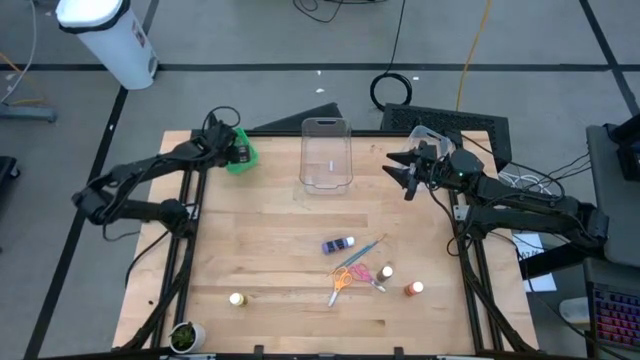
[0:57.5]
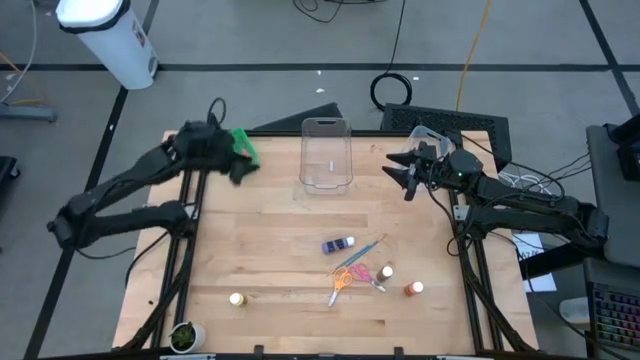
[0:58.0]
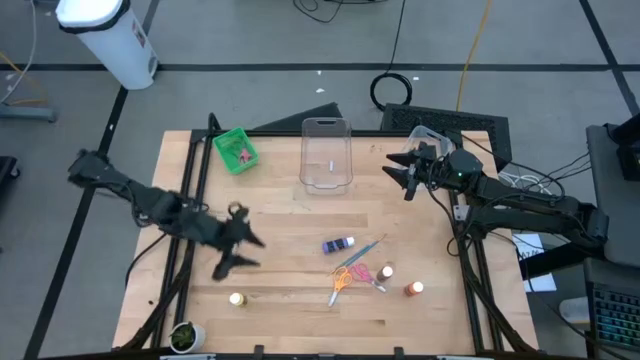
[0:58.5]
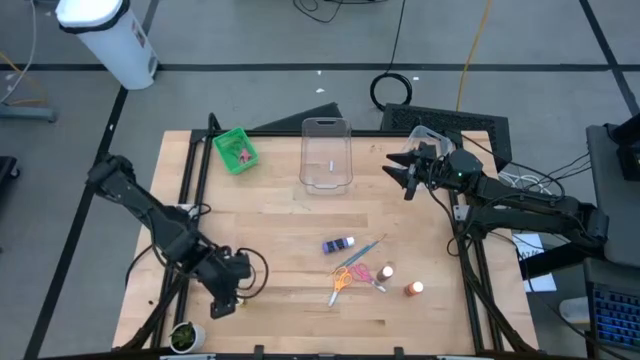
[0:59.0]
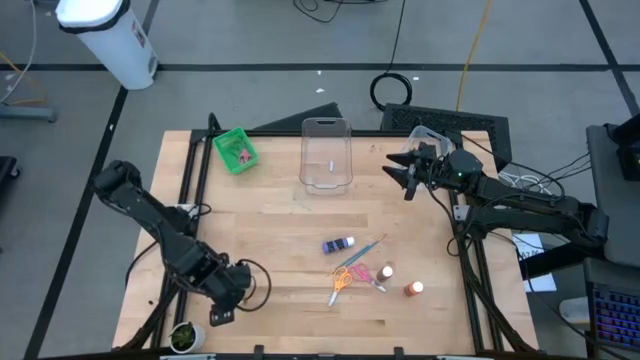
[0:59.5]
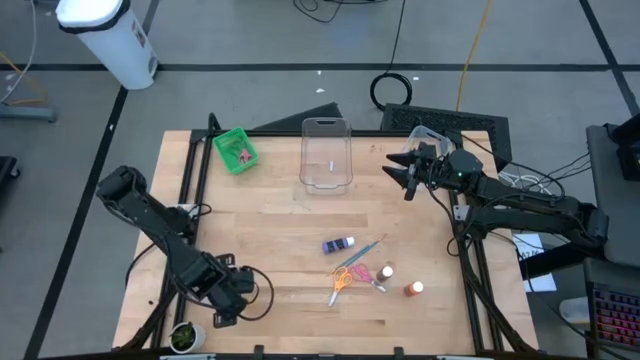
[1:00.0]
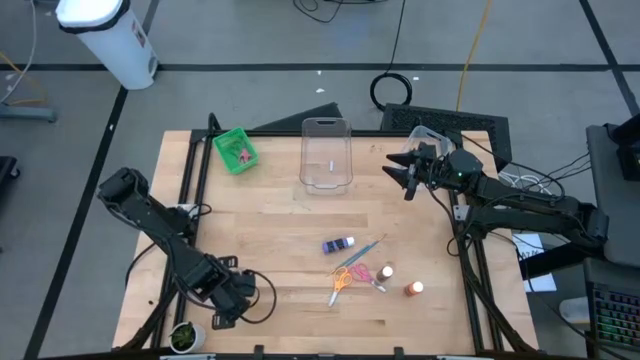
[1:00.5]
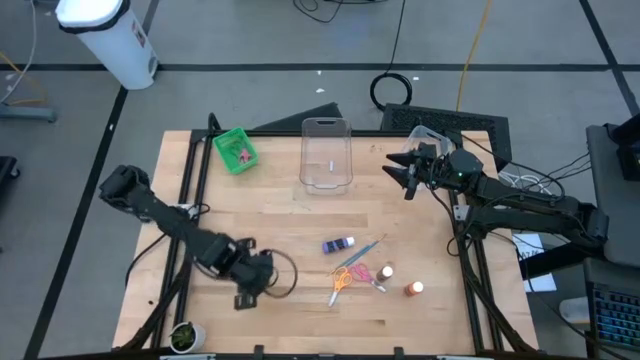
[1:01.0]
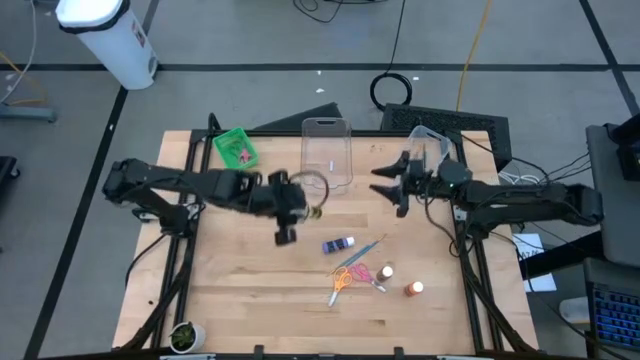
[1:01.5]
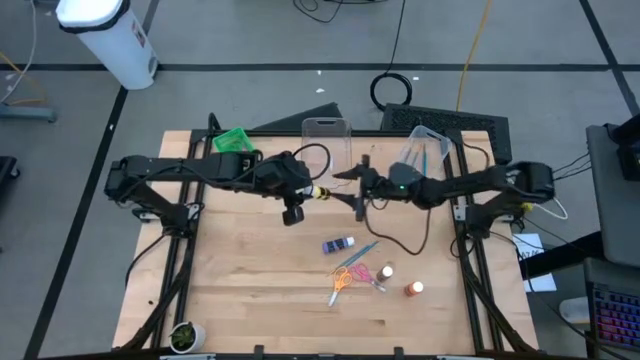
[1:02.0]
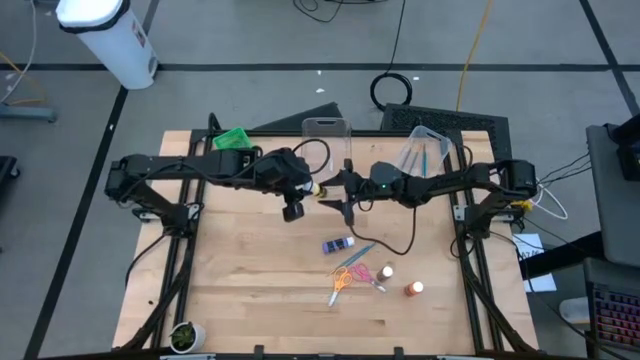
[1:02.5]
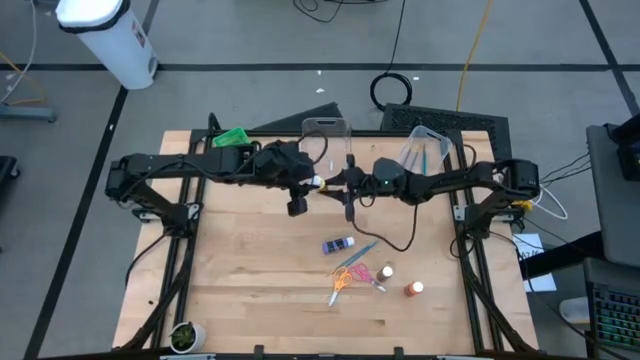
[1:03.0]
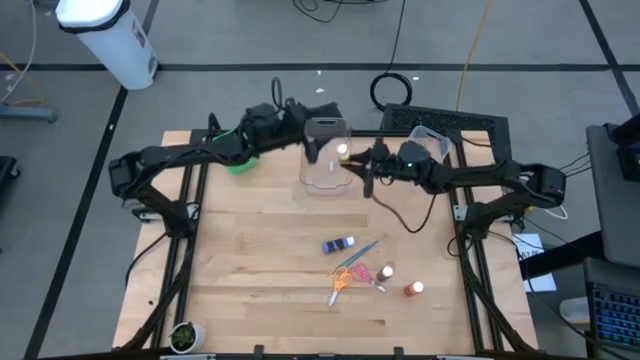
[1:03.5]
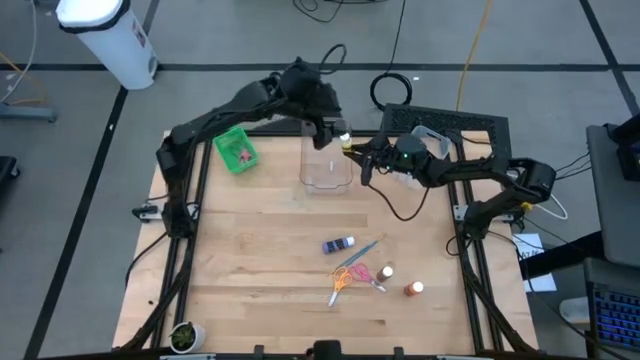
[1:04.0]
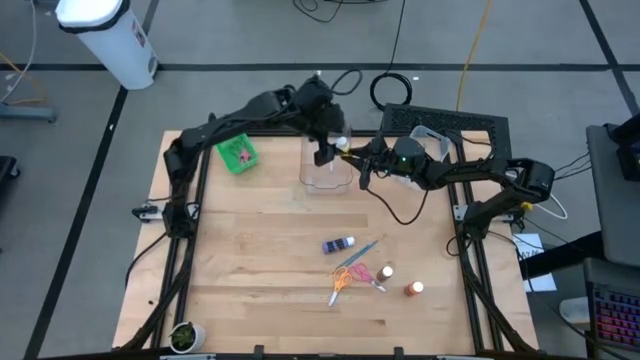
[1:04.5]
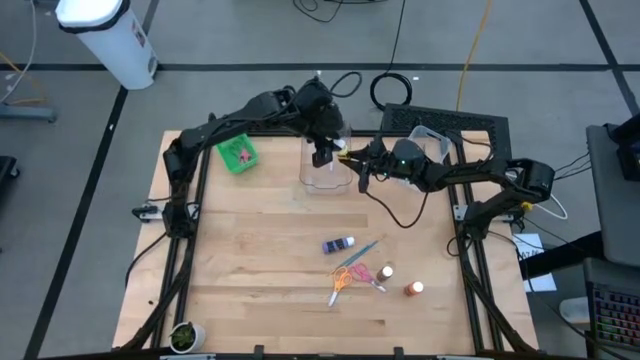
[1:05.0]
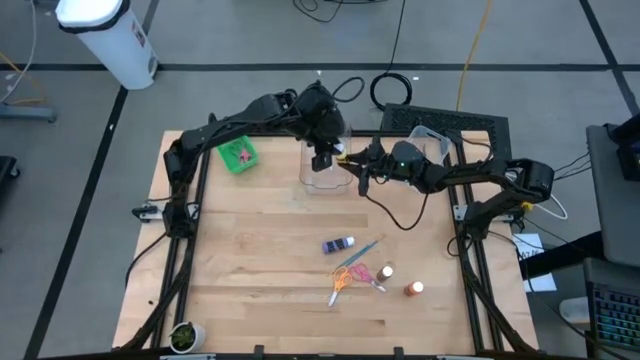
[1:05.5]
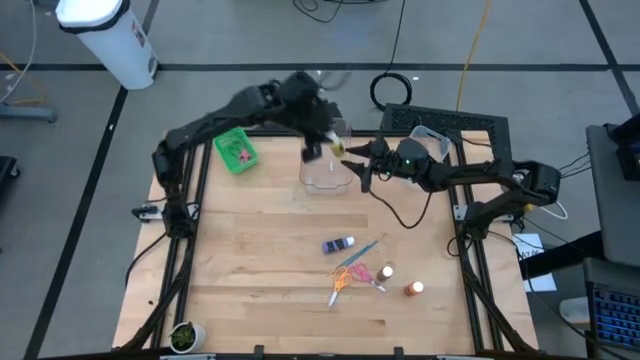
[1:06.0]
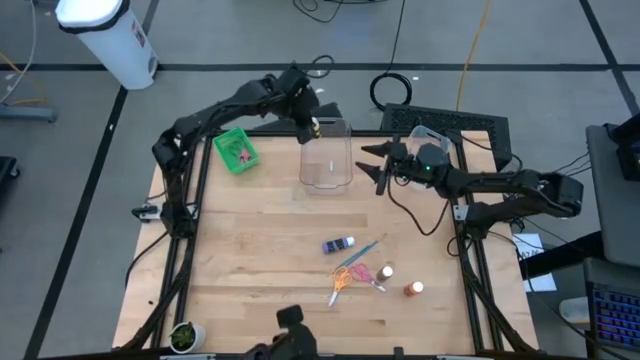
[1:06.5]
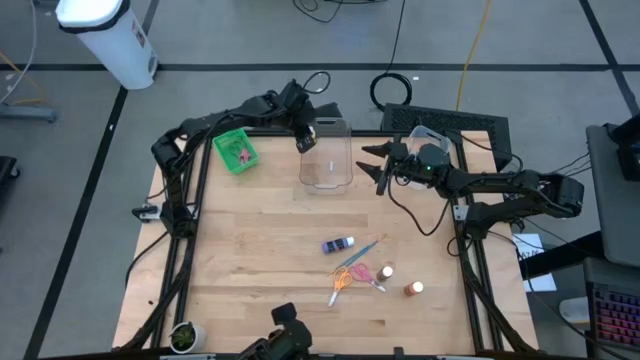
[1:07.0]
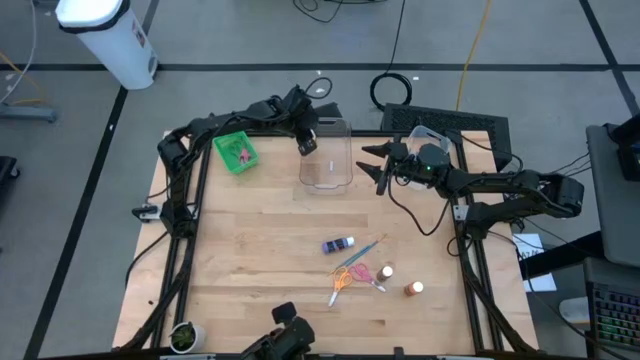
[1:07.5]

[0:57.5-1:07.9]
Task: Pick & Place Paint Supplies
Put the yellow paint bottle into the transparent bin

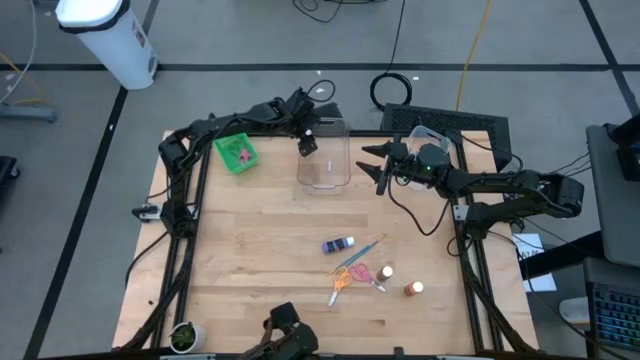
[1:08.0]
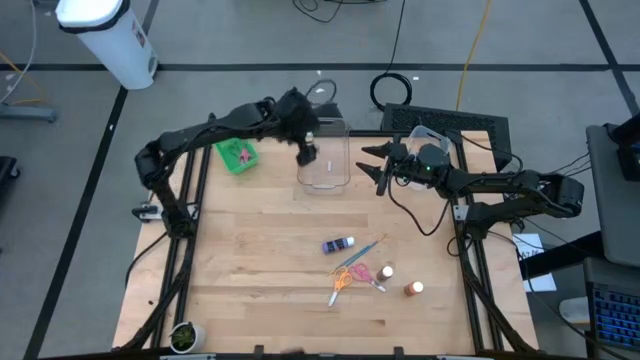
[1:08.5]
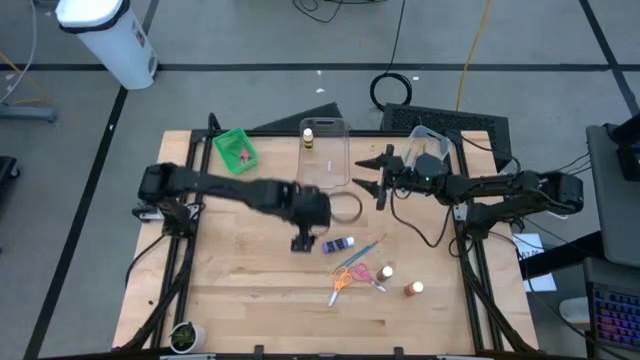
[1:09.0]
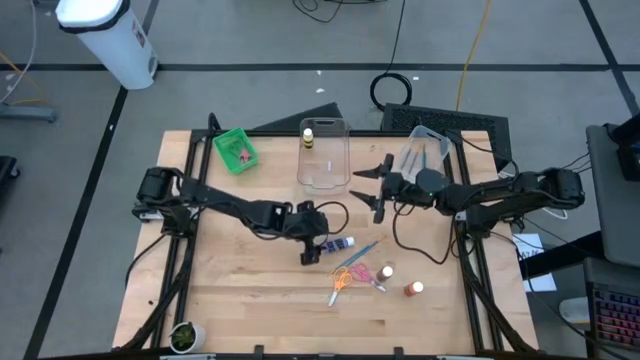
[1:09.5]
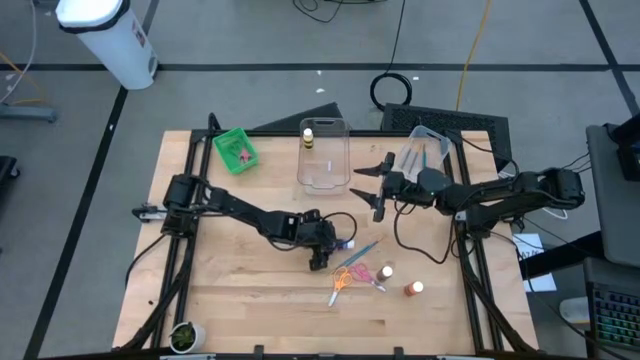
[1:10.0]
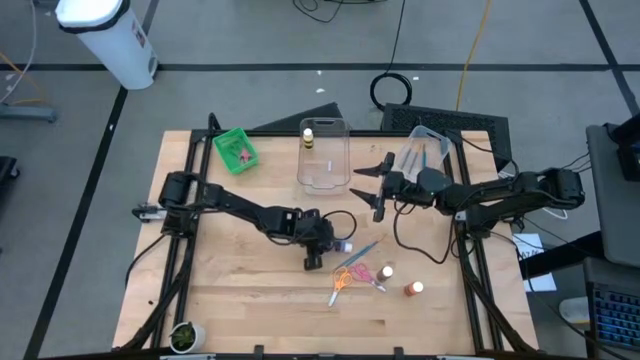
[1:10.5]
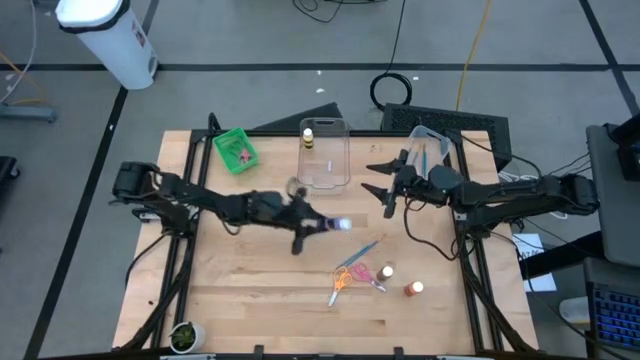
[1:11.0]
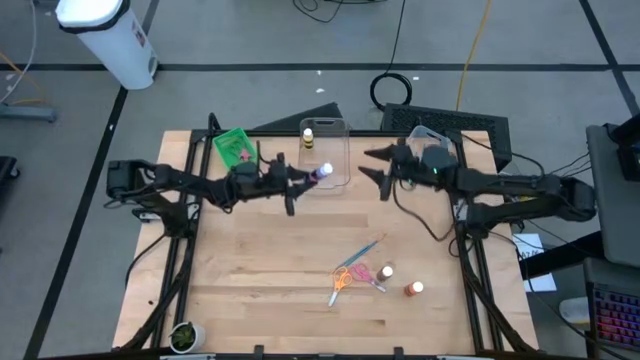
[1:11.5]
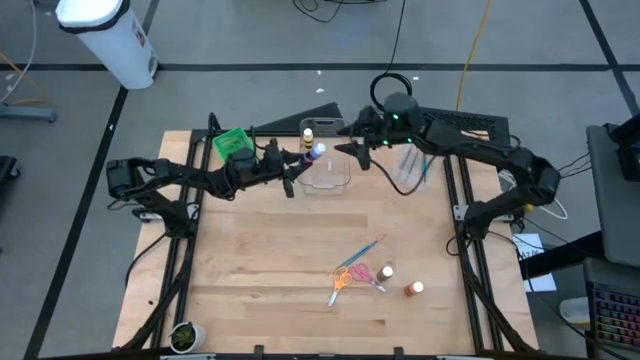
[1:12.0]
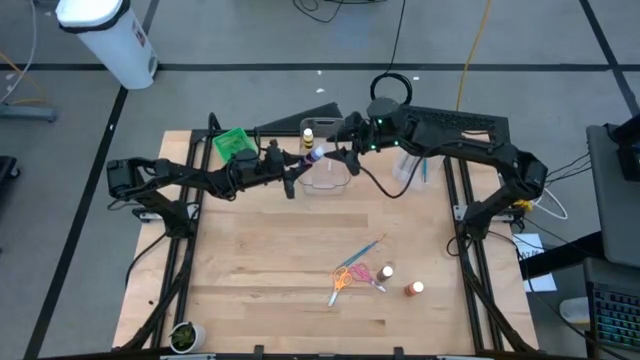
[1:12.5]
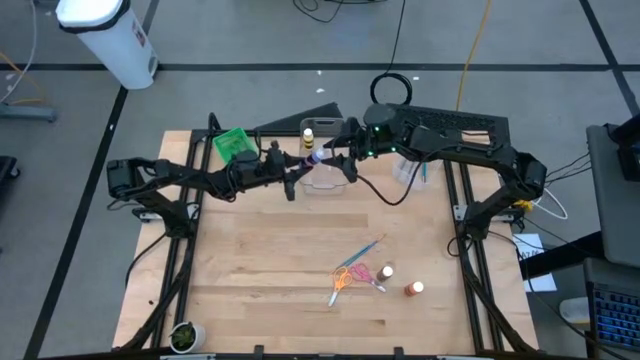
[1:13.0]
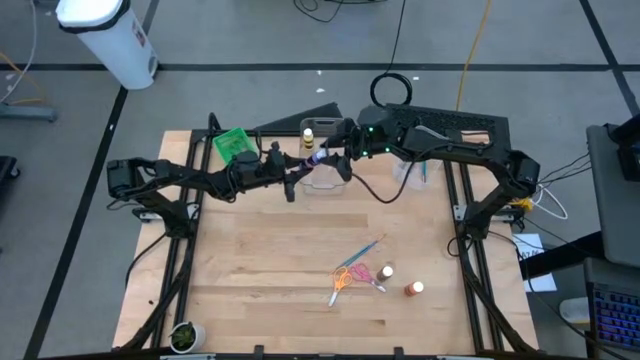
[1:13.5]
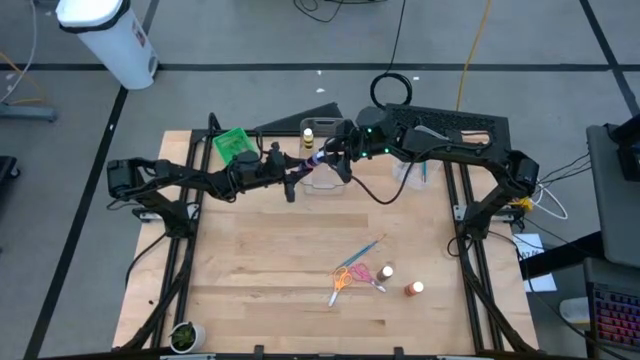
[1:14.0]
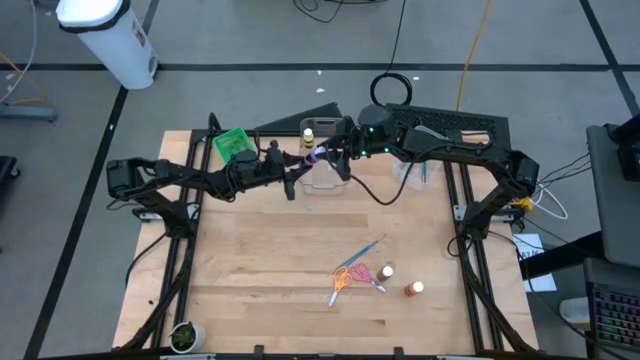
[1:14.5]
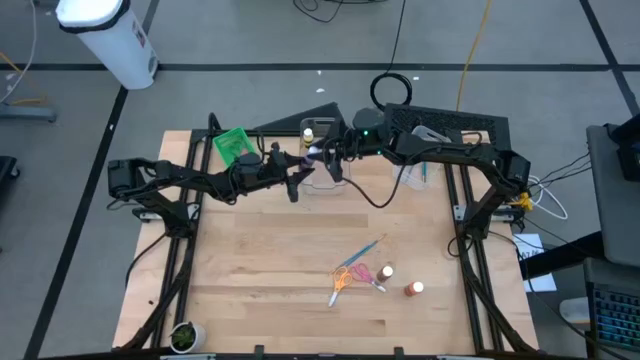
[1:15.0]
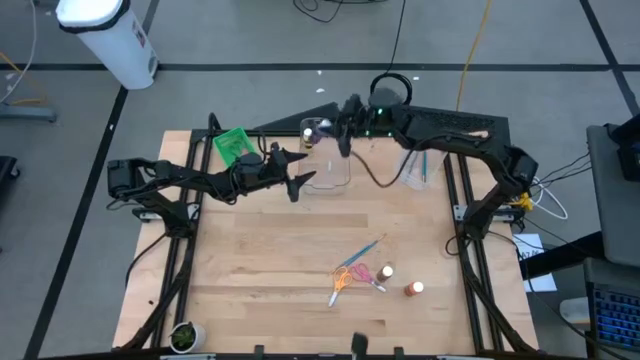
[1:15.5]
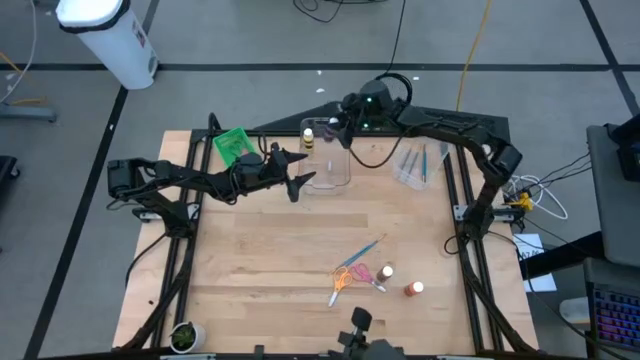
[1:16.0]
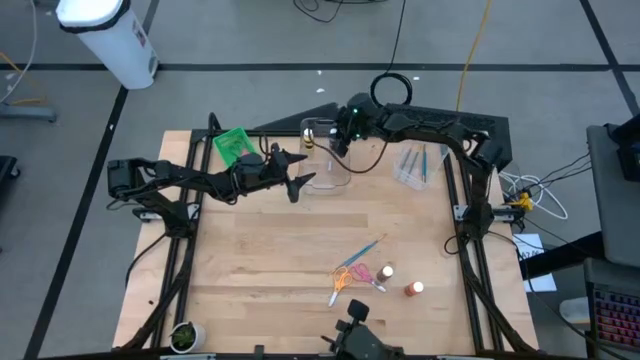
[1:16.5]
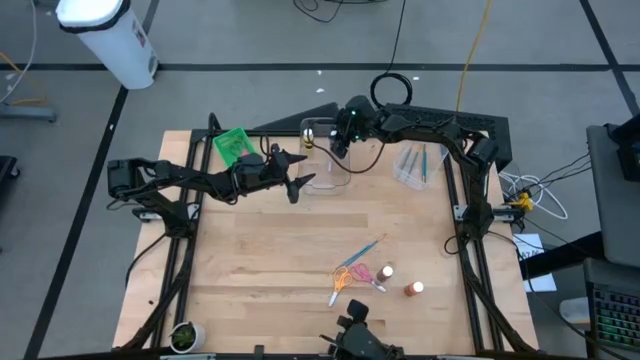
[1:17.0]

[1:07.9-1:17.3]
Put the purple paint bottle into the transparent bin

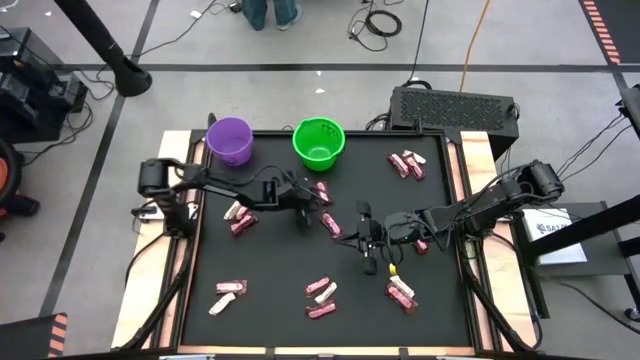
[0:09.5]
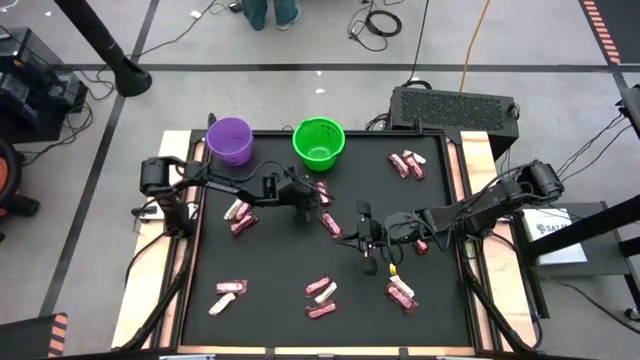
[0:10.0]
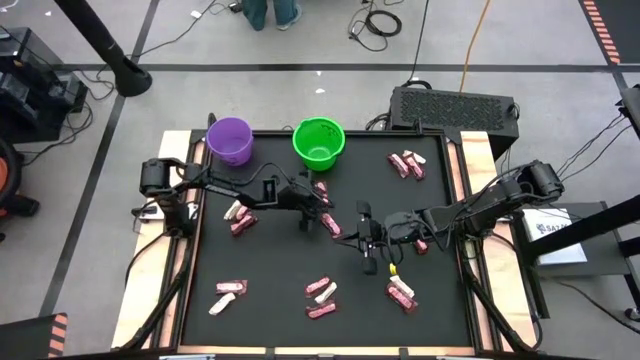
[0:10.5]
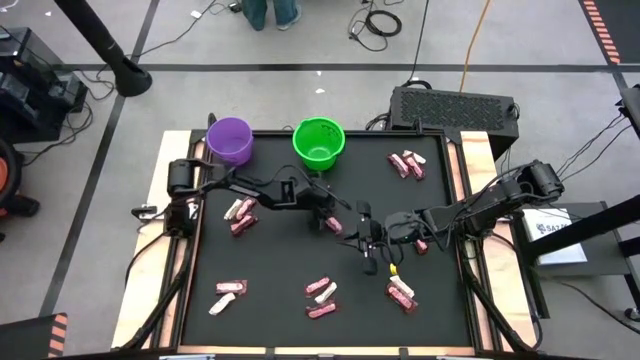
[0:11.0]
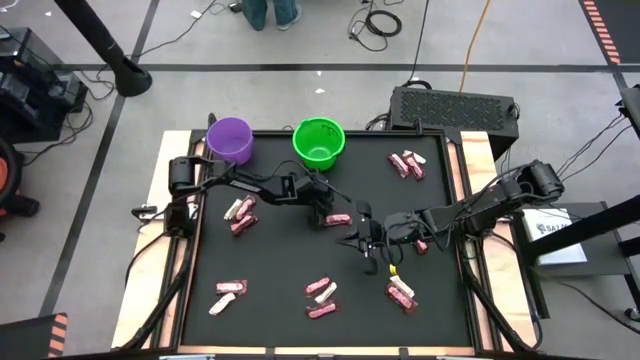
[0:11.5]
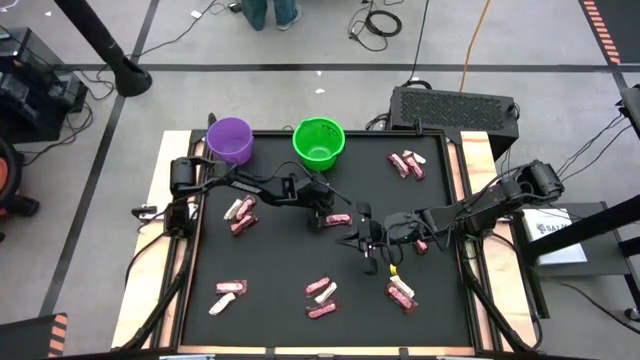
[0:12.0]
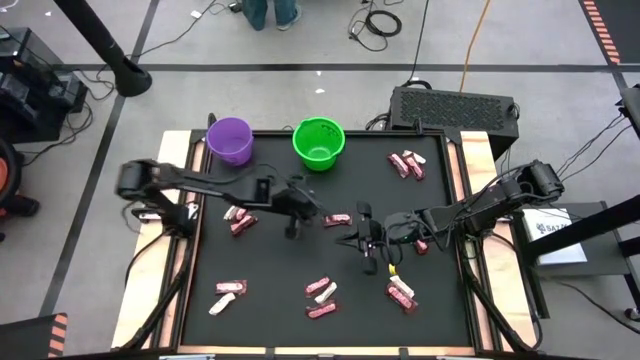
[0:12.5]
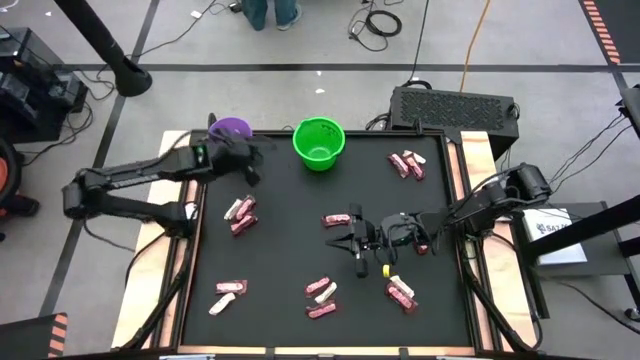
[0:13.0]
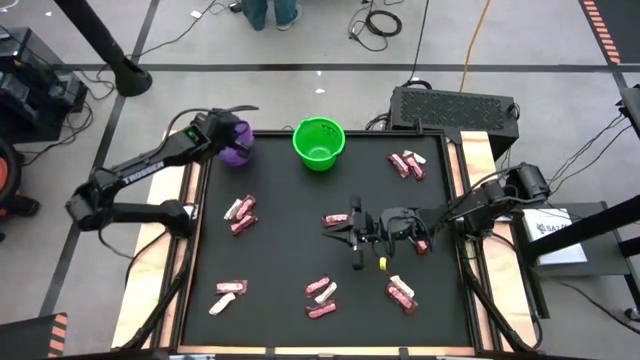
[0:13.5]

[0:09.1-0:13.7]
Task: Sort candy by brand, put in halloween buckets
Put the brown chocolate bar into the purple bucket
